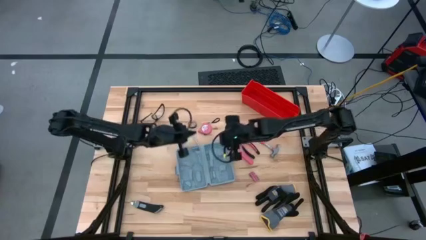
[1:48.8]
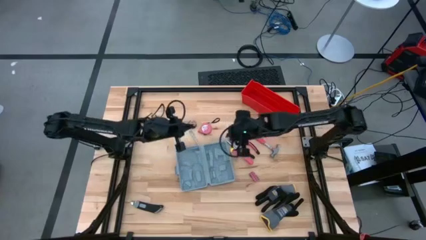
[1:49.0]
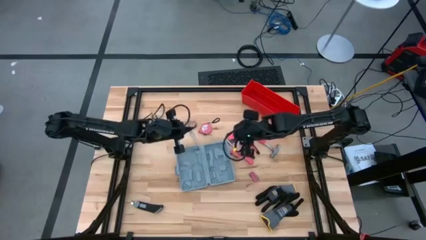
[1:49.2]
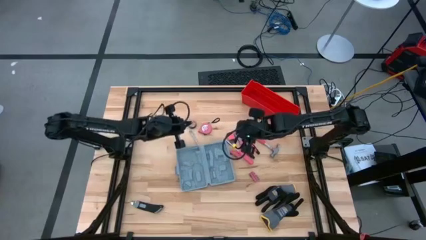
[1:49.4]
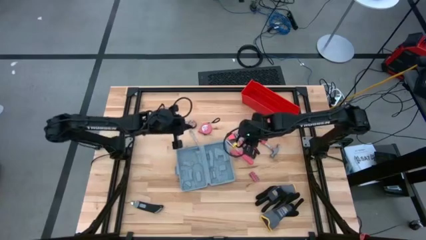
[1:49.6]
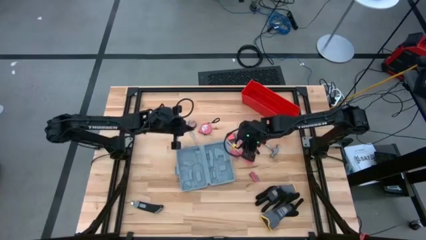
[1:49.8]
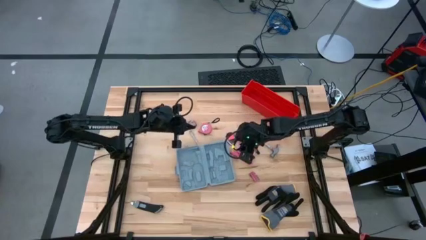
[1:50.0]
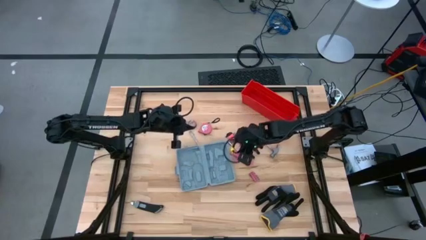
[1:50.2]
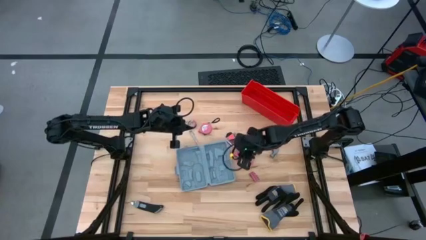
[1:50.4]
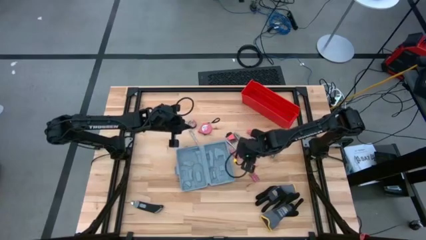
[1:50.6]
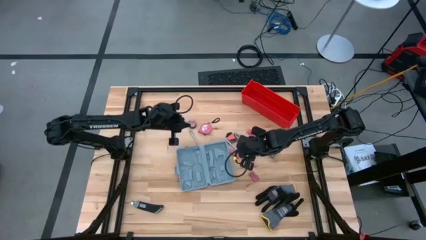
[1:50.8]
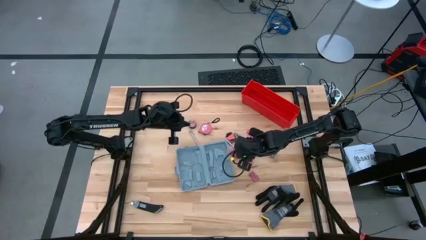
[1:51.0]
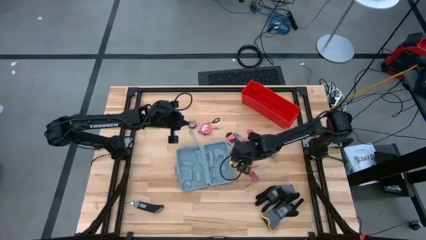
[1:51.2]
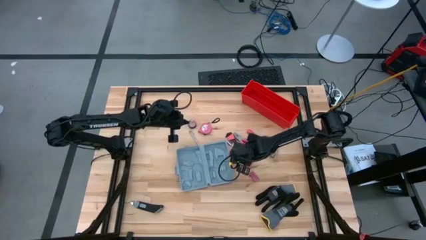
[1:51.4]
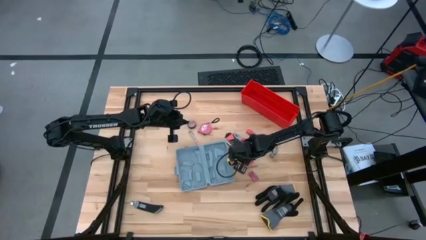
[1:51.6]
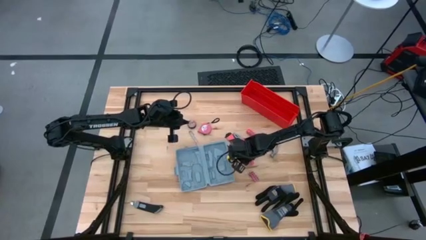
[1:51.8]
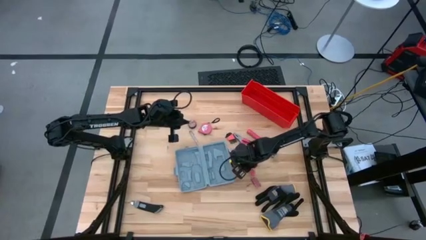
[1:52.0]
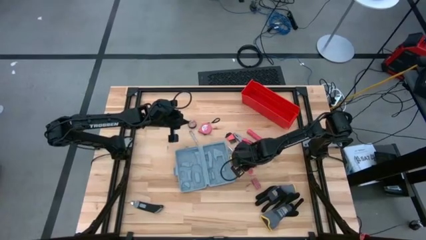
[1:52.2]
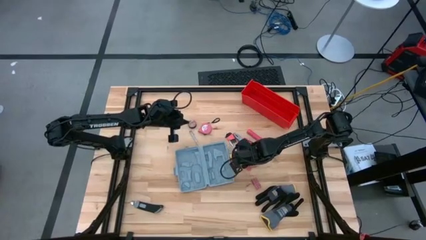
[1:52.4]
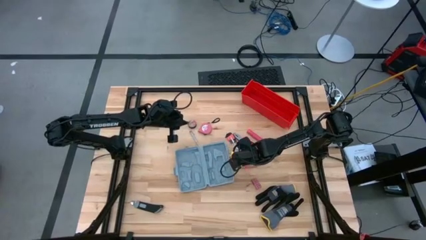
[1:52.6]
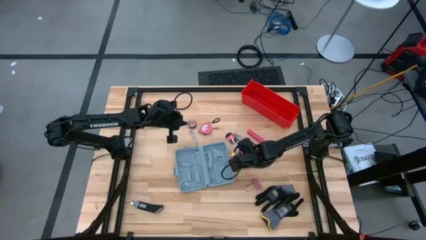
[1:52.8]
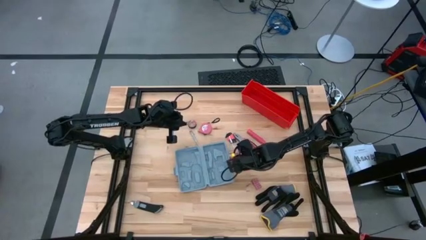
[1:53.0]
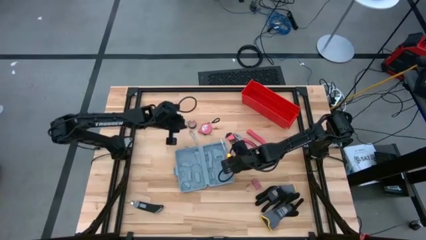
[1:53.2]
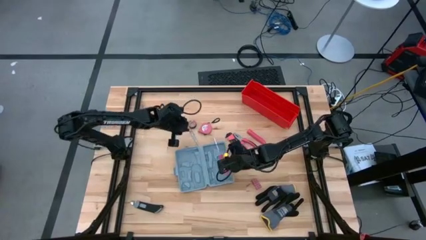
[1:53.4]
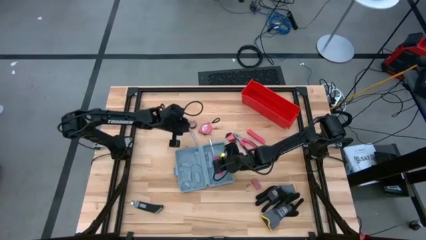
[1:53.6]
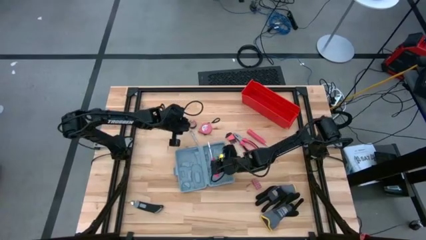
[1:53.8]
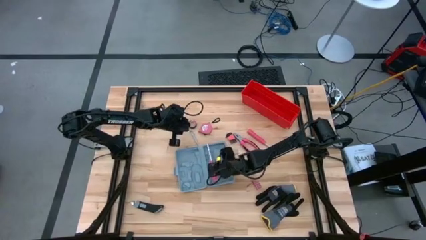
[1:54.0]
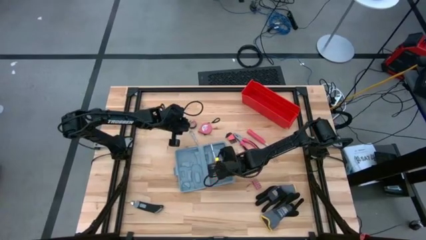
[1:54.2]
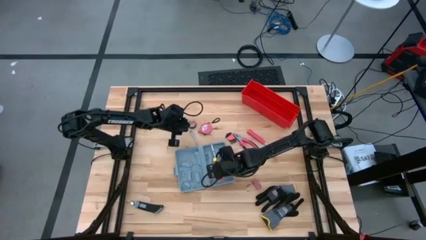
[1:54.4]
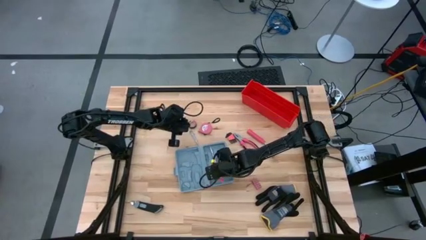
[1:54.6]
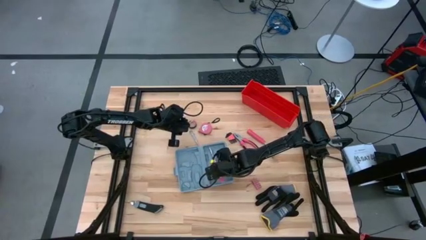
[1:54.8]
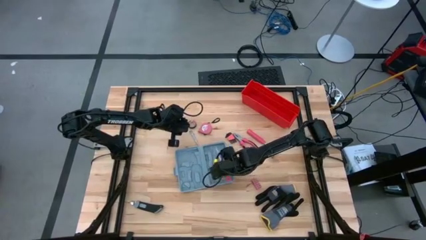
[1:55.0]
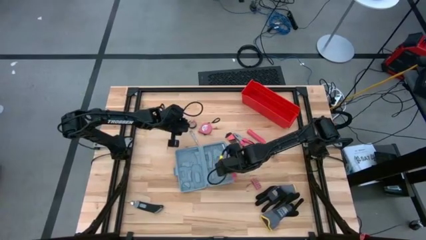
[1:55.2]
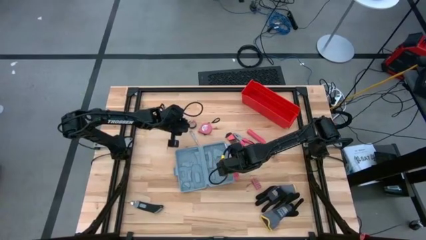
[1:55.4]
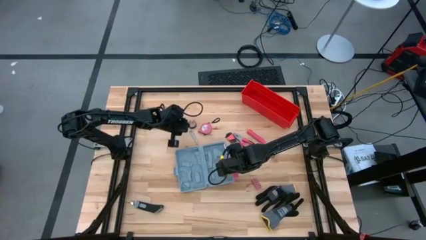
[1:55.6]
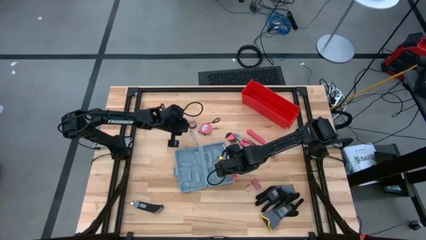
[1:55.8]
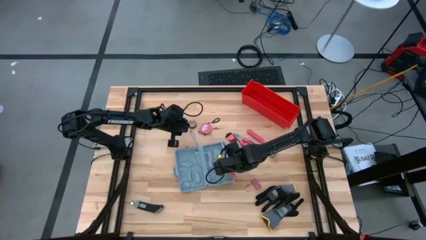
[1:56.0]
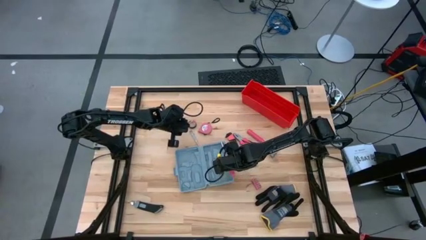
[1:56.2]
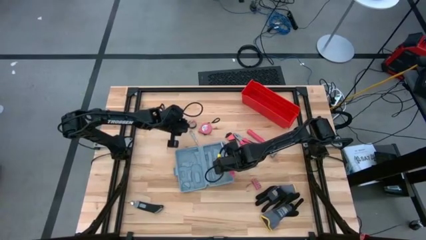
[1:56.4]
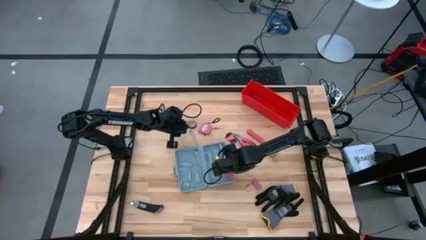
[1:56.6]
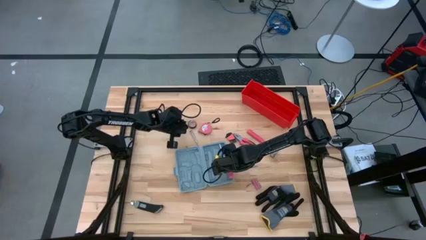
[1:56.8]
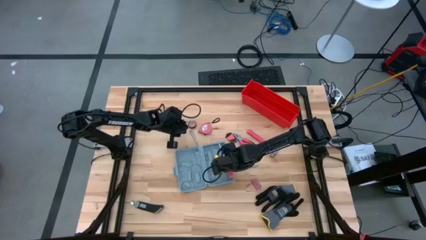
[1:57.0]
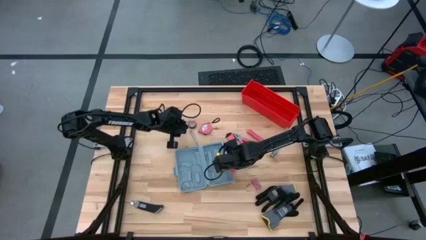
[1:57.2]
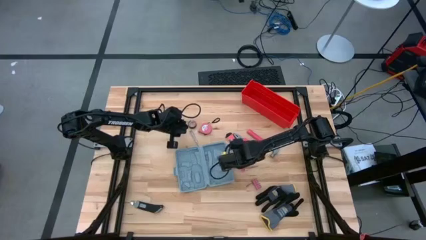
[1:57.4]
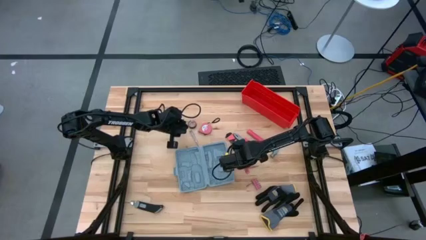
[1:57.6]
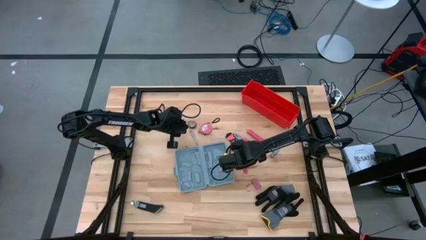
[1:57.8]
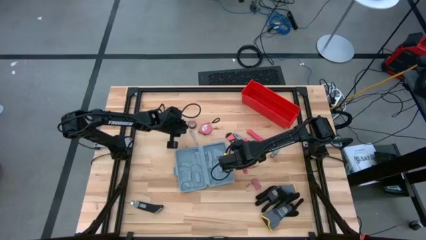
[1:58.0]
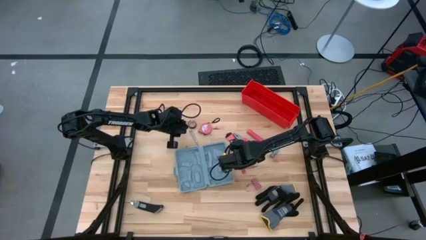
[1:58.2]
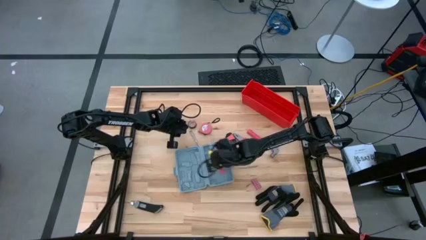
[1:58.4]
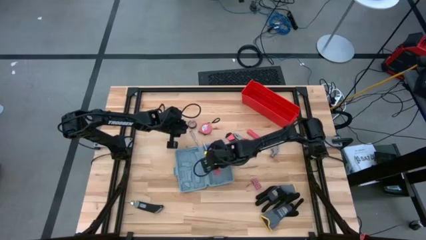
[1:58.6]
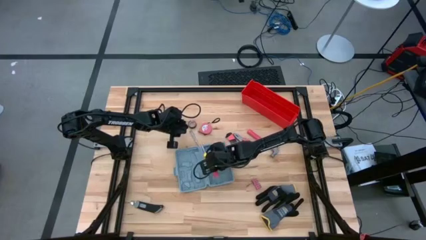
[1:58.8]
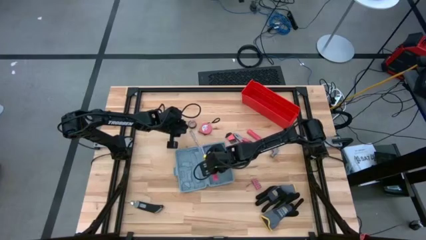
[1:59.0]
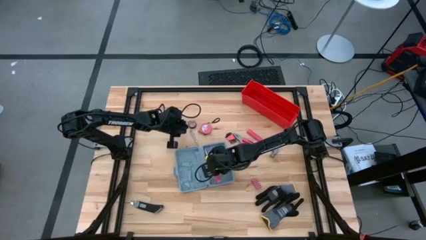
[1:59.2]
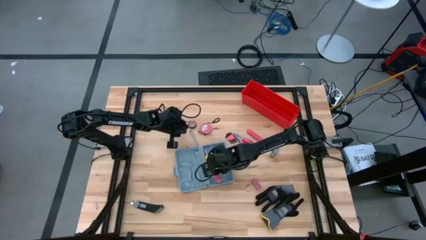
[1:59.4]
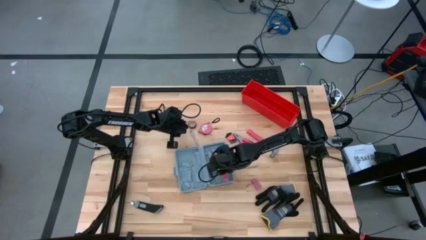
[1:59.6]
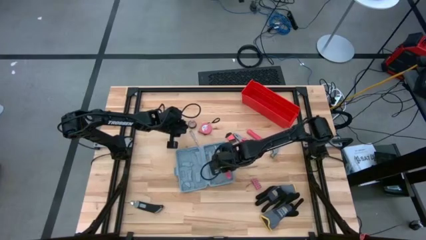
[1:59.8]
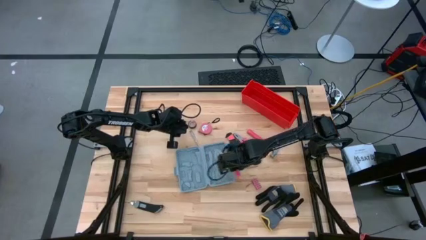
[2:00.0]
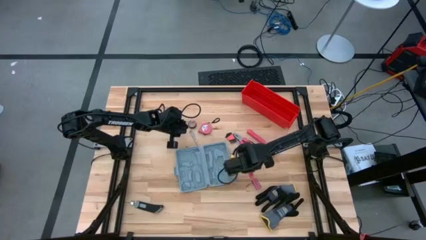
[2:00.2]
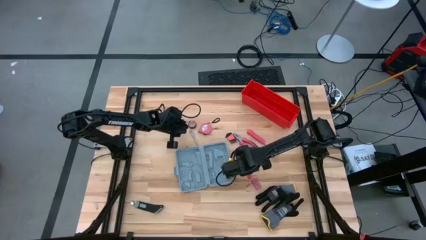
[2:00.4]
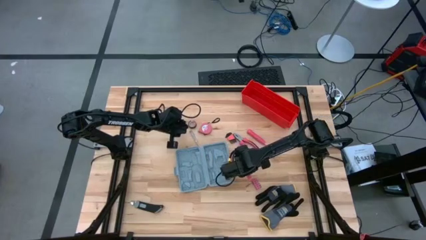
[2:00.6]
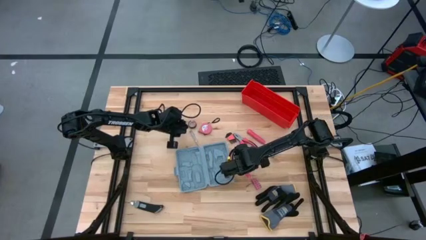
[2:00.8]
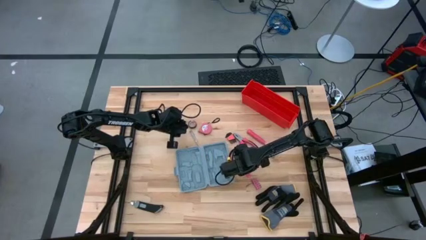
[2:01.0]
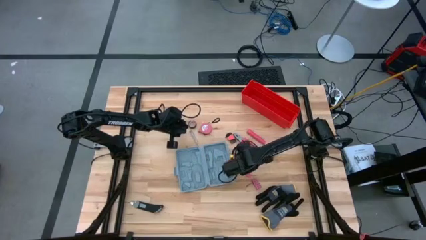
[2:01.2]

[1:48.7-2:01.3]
Task: prefit tool cases
Put the screwdriver into the toolbox

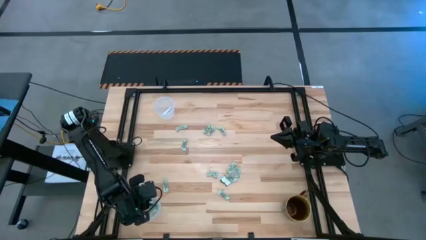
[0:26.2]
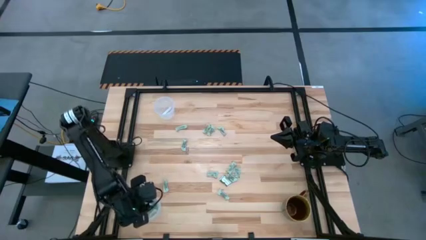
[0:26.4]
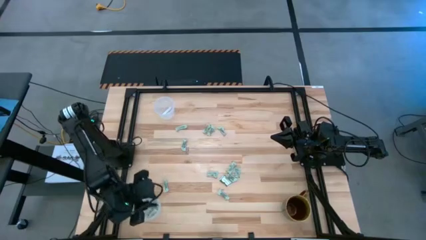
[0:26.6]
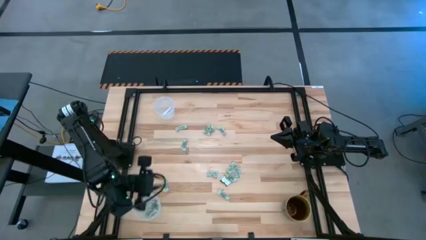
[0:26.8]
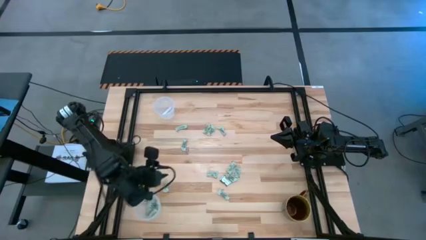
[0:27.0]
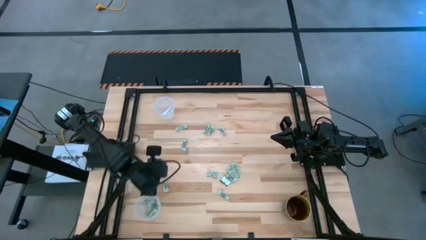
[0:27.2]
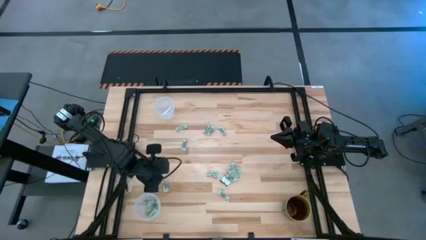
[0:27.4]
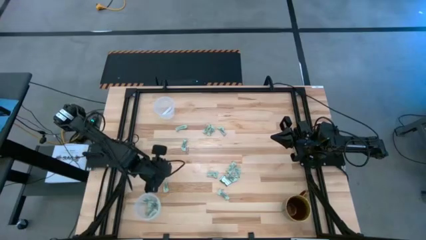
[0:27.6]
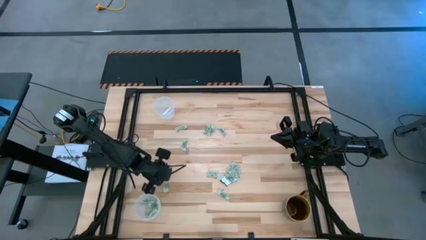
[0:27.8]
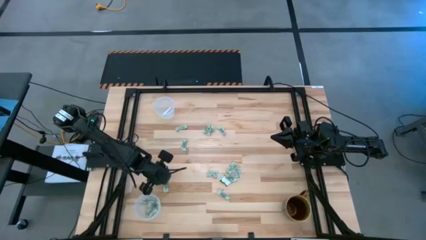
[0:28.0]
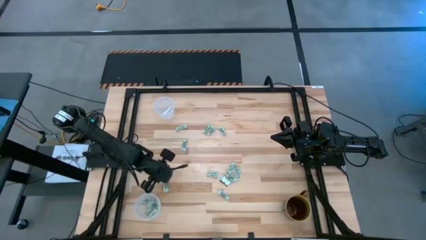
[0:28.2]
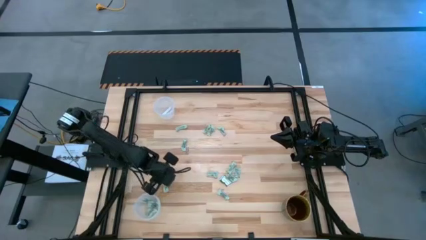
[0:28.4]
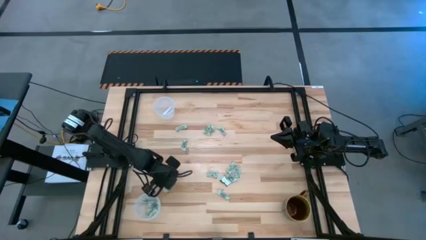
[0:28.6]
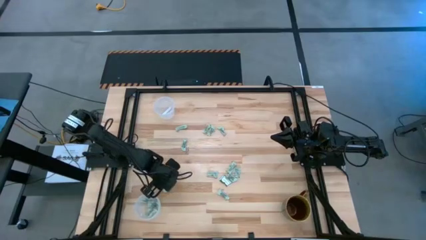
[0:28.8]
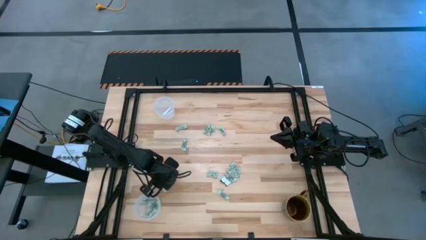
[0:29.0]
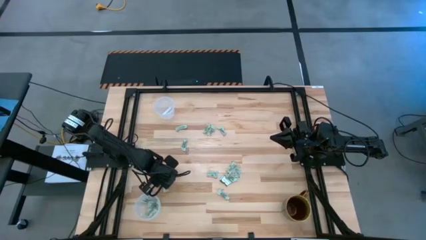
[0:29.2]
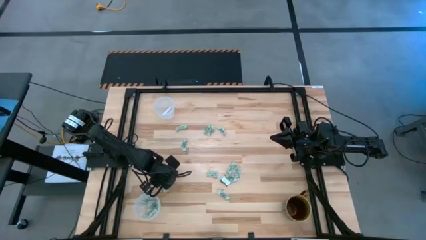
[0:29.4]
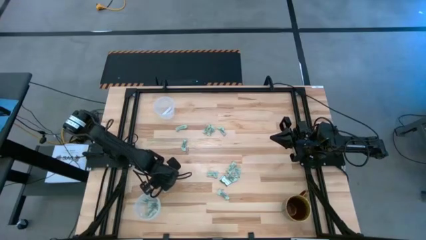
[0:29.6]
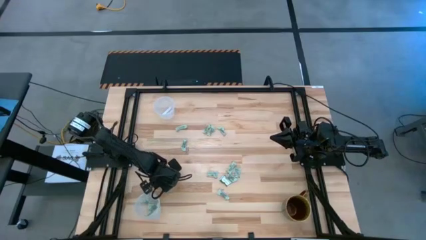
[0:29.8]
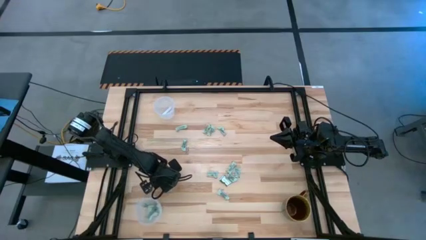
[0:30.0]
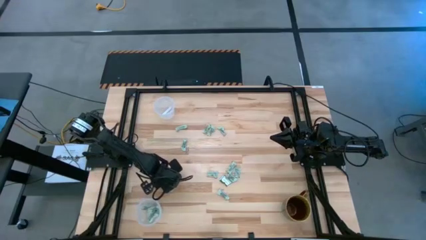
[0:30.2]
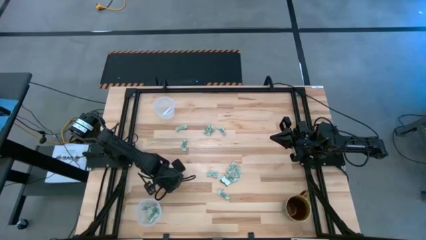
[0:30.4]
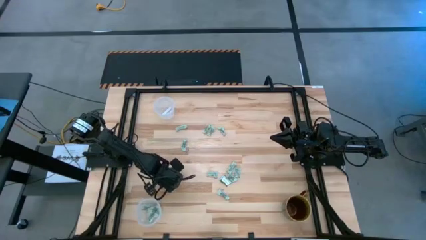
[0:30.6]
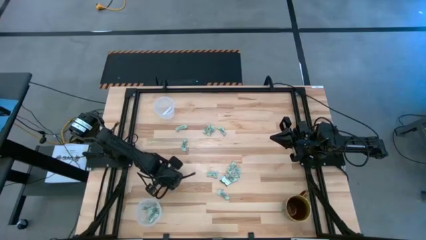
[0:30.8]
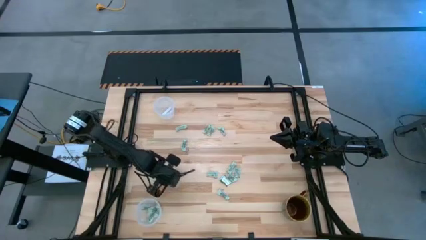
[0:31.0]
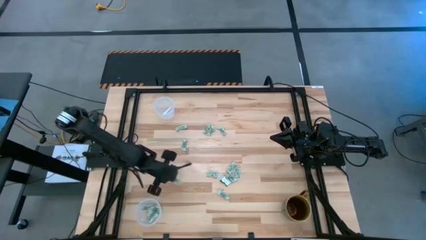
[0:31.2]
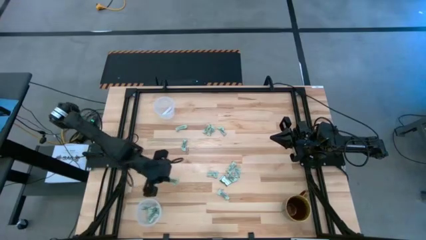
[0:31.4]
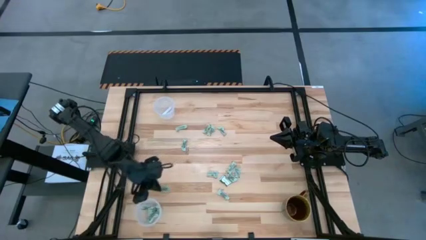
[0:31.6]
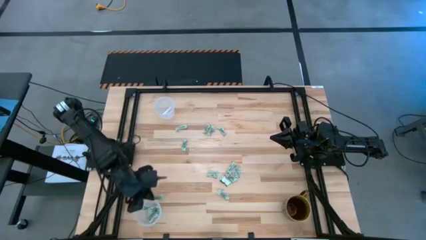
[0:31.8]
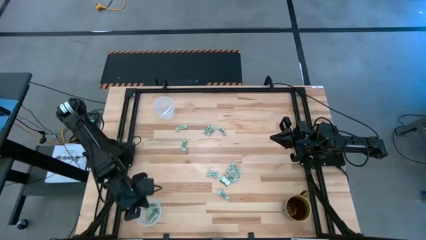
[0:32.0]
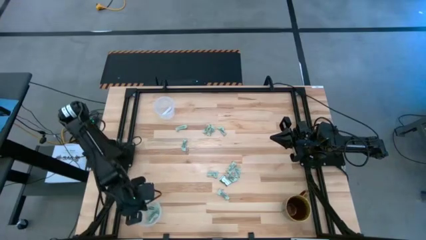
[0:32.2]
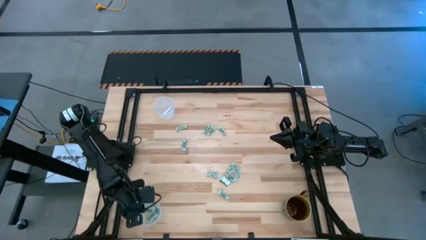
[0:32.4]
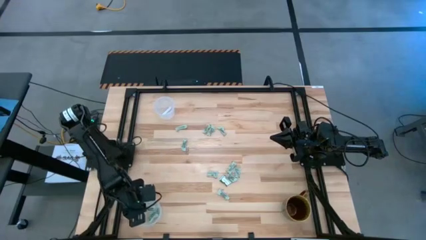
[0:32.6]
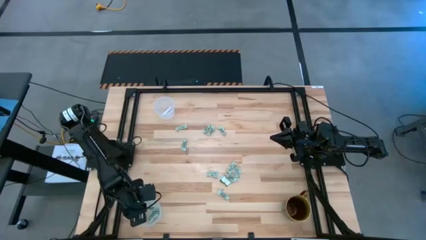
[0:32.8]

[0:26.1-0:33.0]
Task: Pick and place Stevia / Truvia into bins
Put the stevia packet into the bottom transparent container
